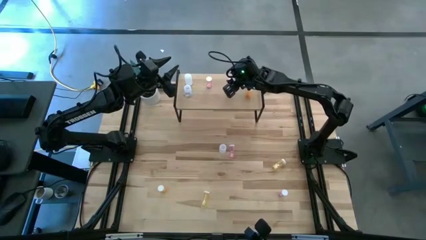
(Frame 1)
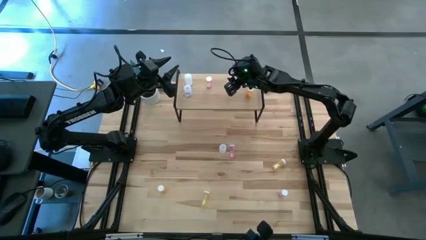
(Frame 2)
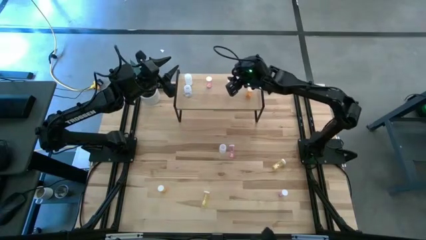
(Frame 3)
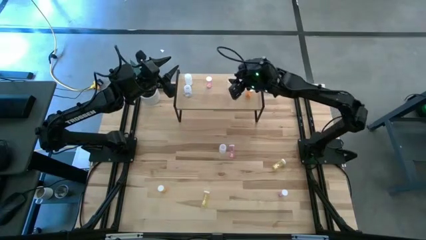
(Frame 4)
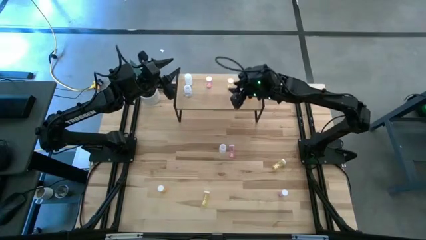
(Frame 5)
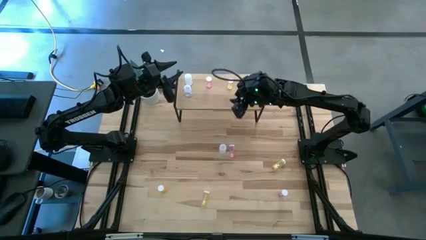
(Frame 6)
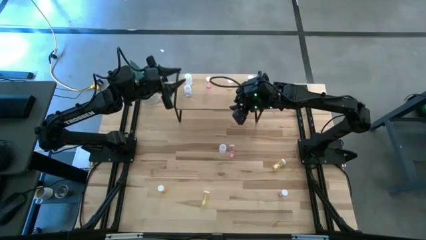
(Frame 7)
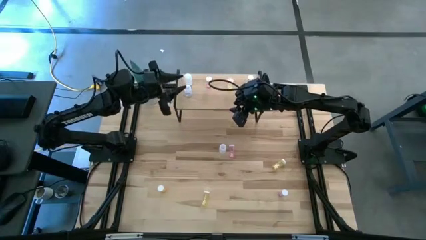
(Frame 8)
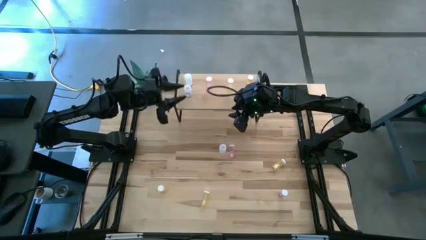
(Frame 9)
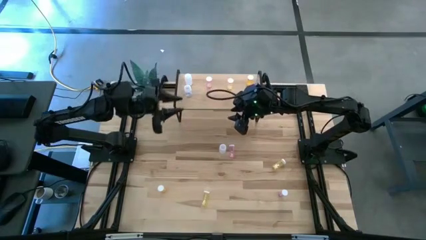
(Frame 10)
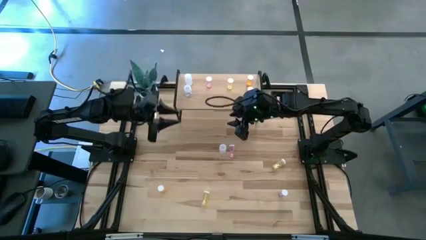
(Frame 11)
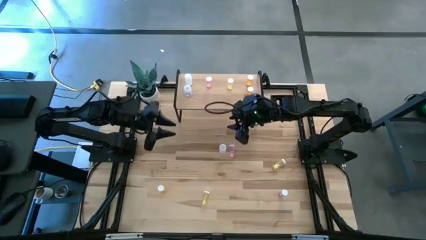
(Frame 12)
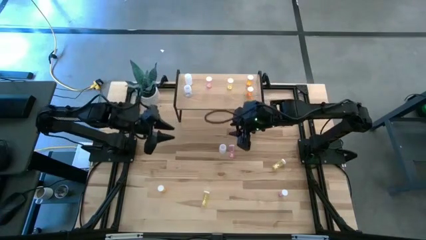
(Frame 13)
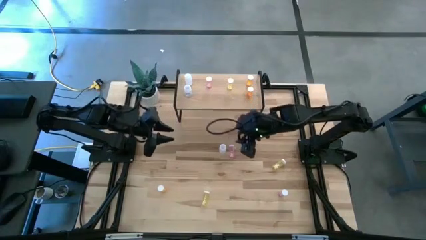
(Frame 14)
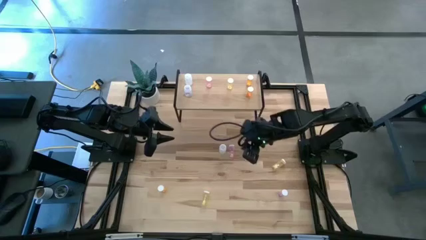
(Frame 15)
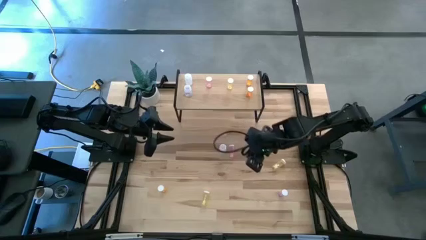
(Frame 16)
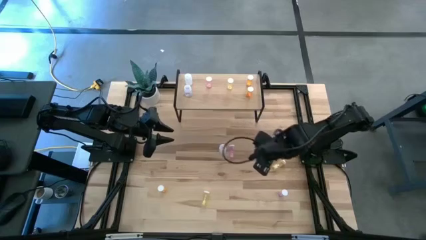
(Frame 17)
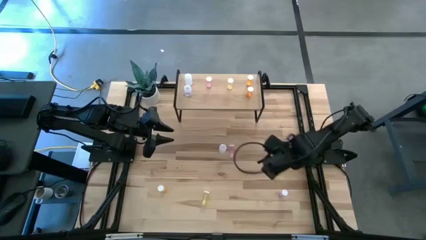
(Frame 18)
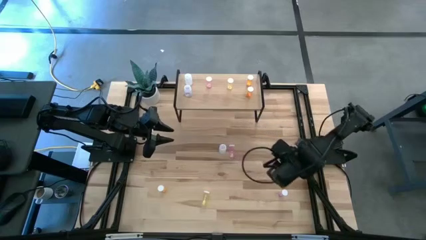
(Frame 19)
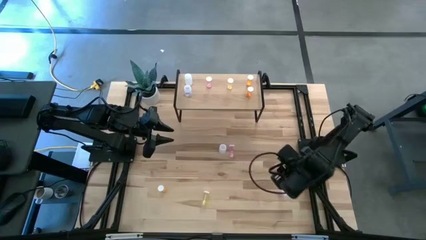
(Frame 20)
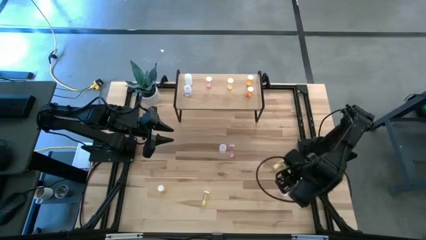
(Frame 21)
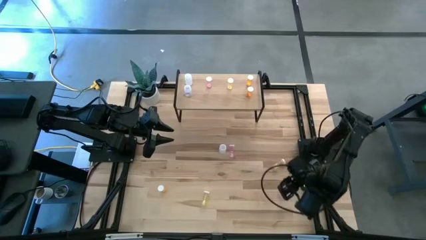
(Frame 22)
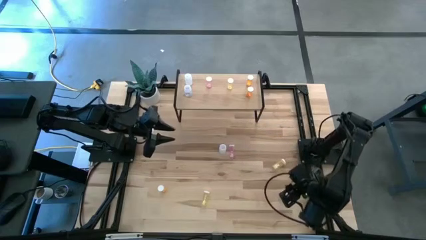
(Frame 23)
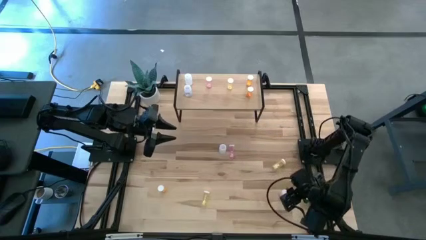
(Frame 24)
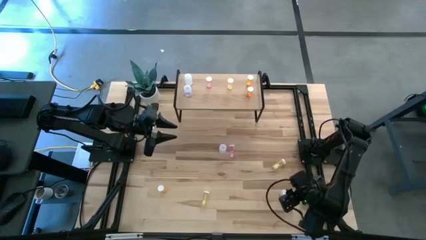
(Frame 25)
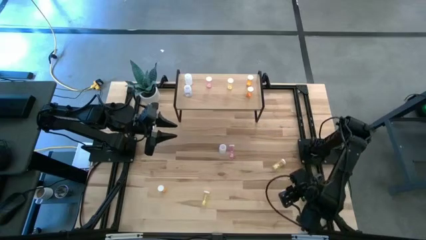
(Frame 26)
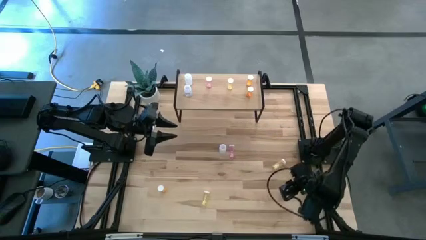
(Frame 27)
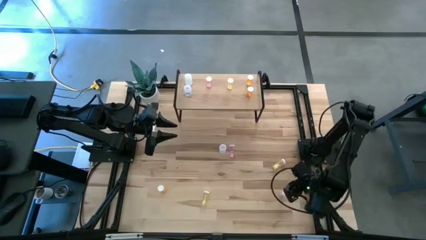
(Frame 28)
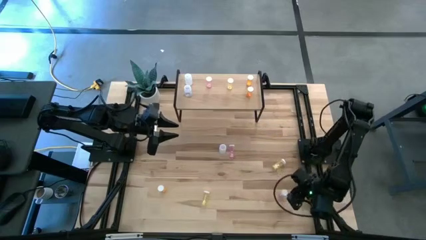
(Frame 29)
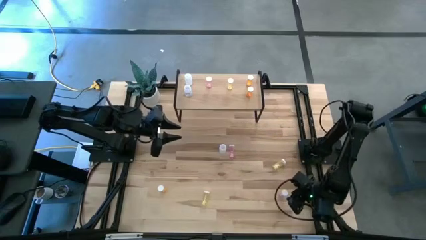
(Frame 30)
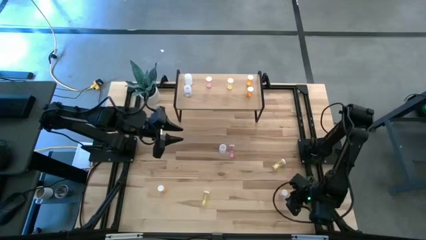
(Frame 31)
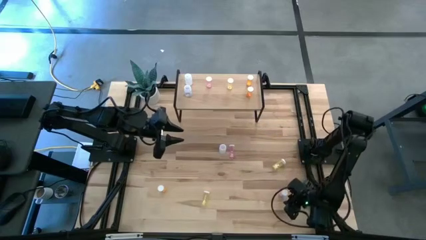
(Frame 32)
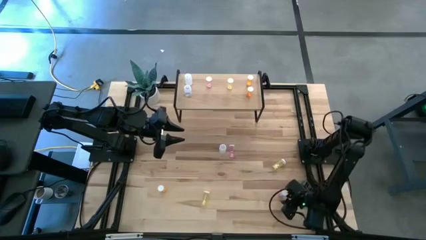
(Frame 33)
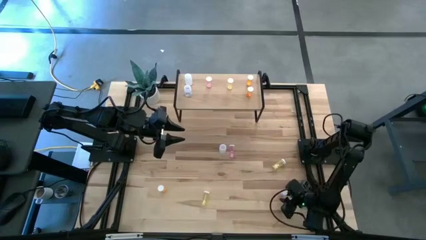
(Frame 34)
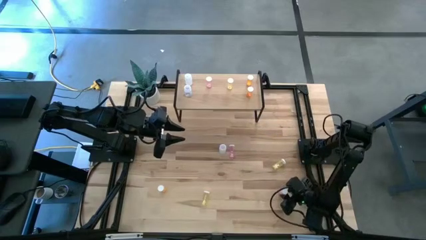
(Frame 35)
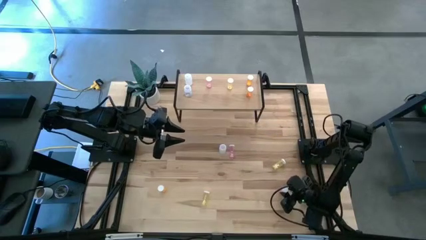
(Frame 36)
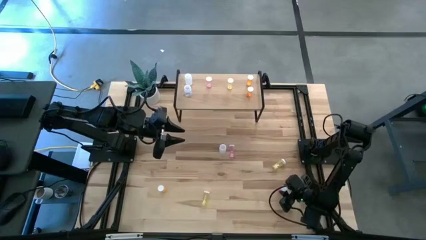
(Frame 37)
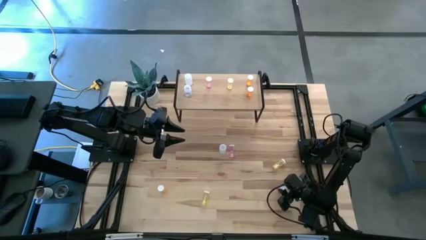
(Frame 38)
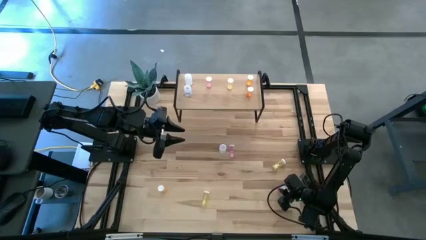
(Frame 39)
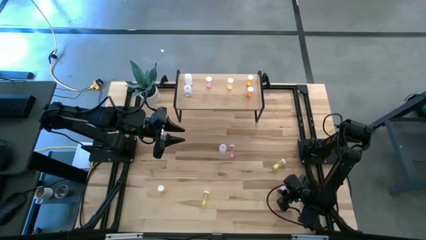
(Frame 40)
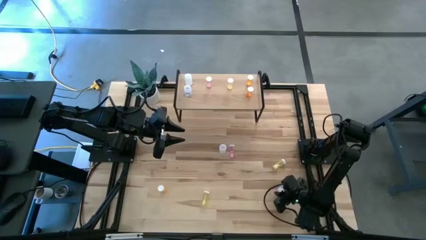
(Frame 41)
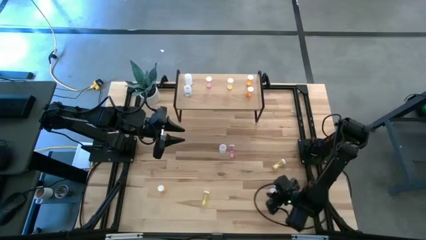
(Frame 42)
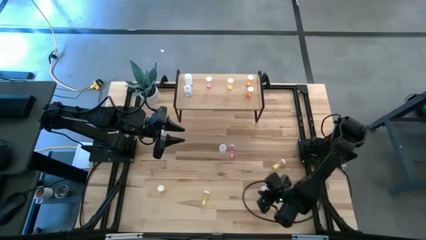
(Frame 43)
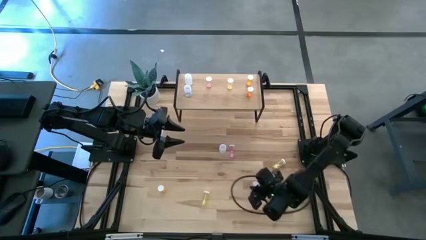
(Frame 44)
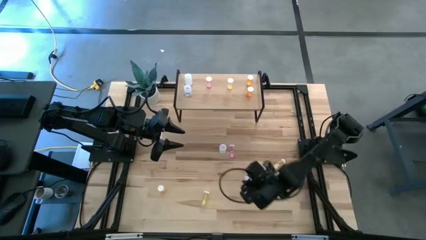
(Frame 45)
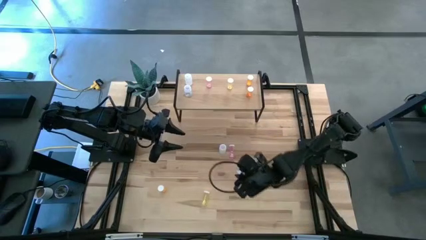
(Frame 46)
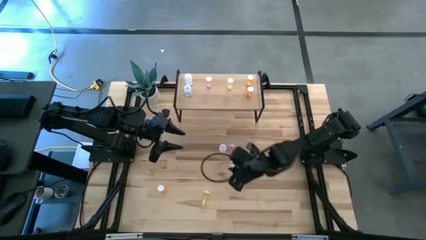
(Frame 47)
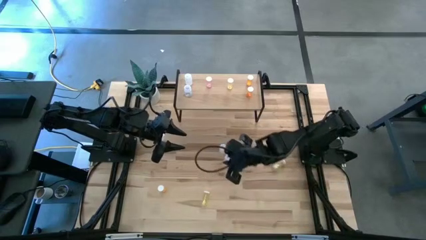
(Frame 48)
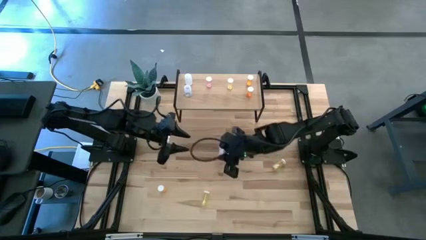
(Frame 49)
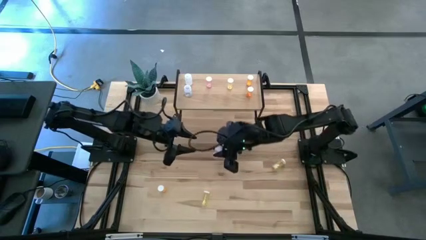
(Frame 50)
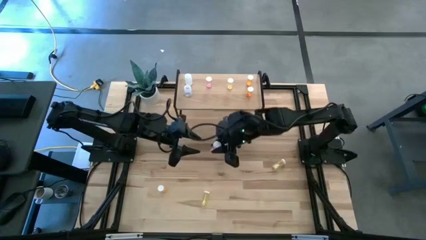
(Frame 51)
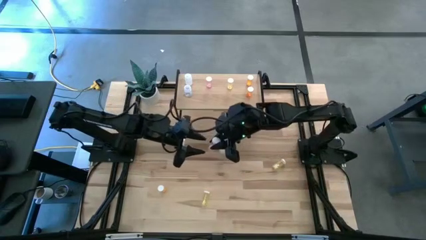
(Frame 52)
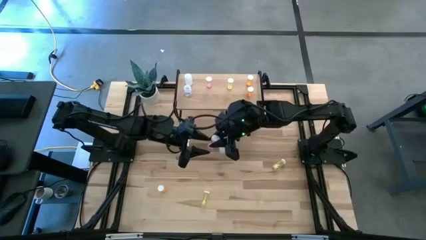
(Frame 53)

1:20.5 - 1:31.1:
Task: Pick and place medicine bottles onto shelf by color
Put the right pink pill bottle aligned with the other pink pill bottle on the shelf
